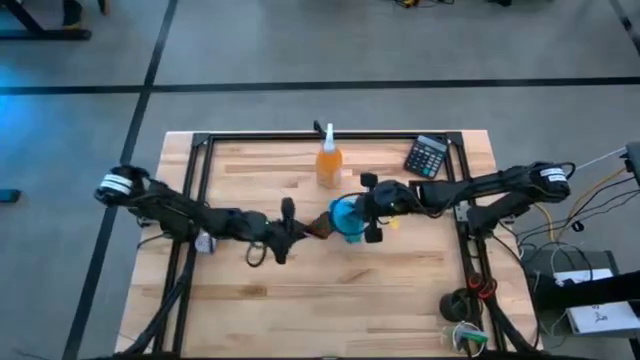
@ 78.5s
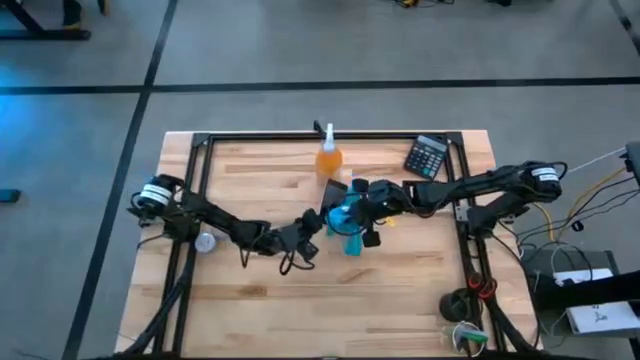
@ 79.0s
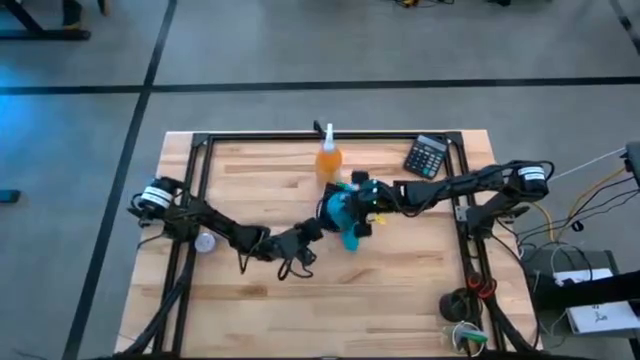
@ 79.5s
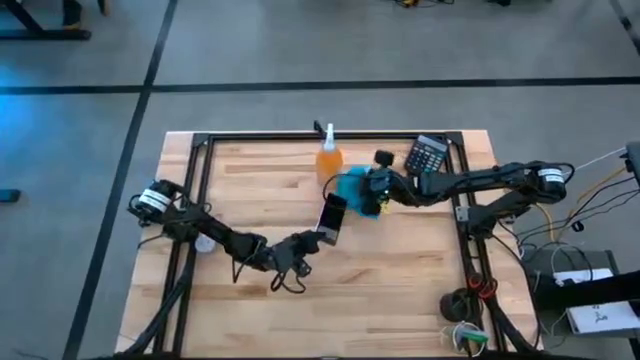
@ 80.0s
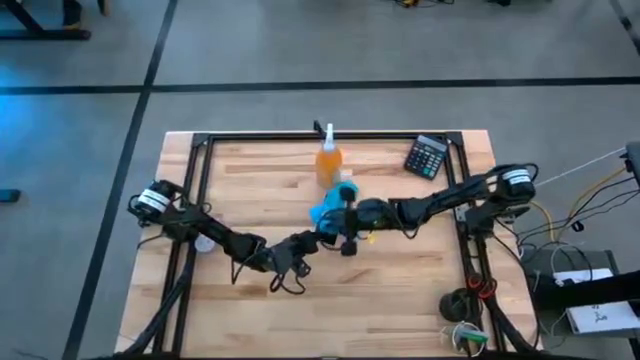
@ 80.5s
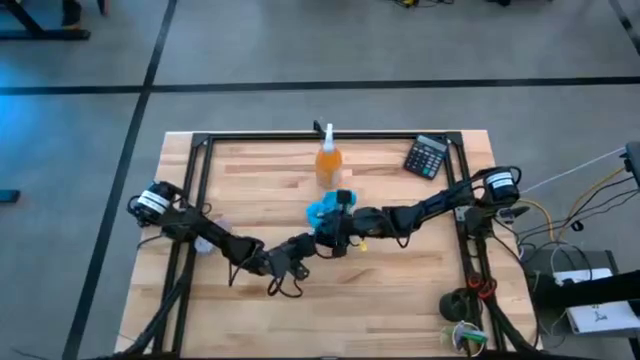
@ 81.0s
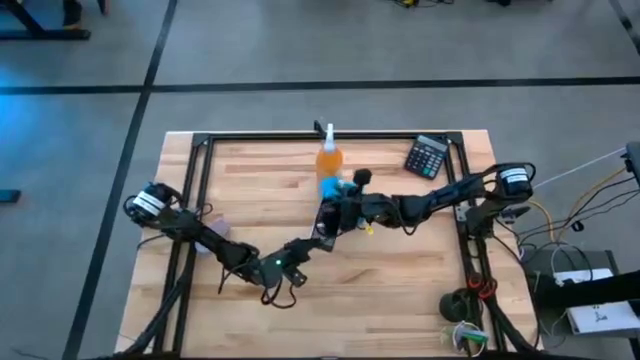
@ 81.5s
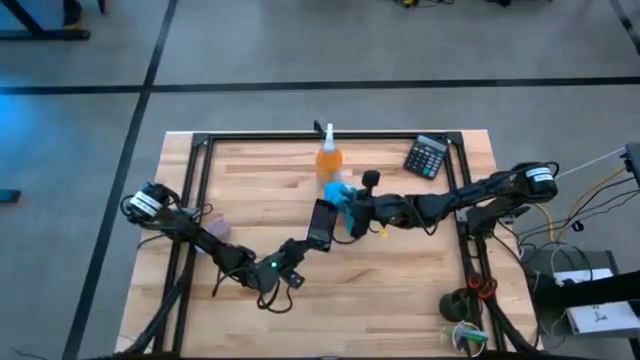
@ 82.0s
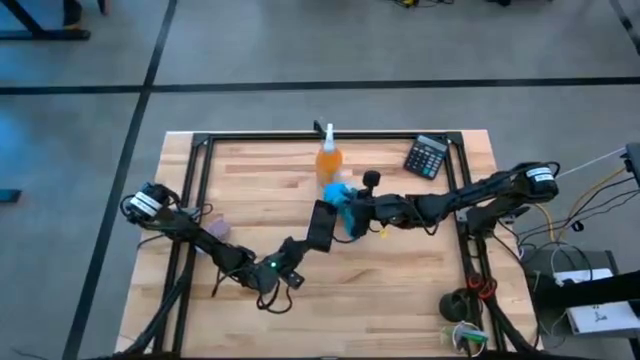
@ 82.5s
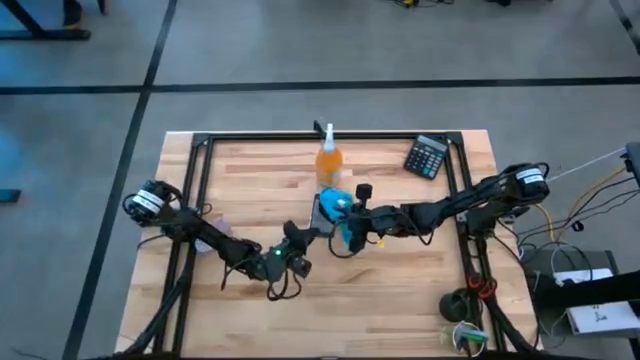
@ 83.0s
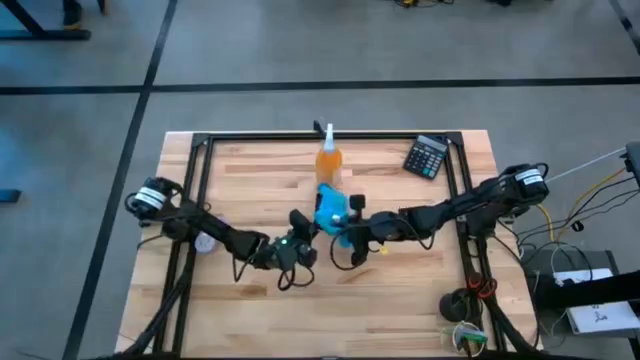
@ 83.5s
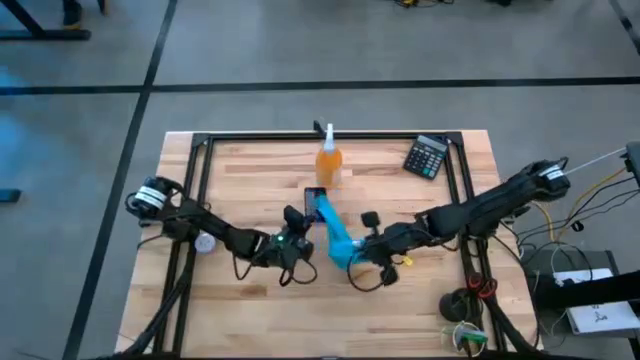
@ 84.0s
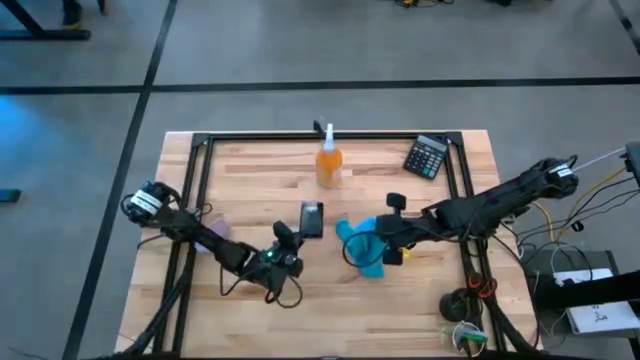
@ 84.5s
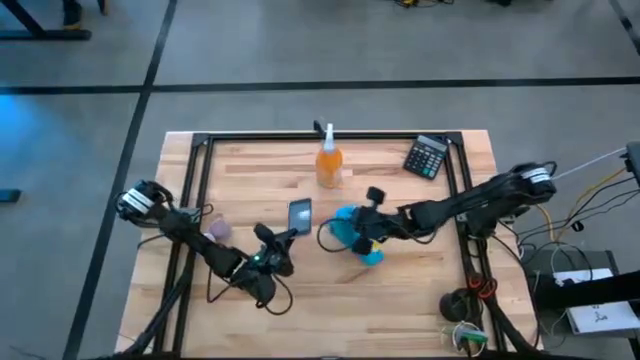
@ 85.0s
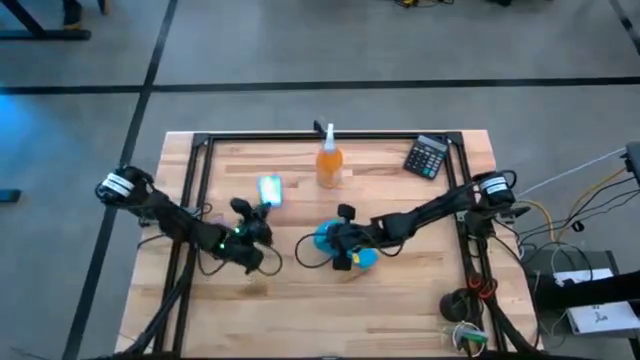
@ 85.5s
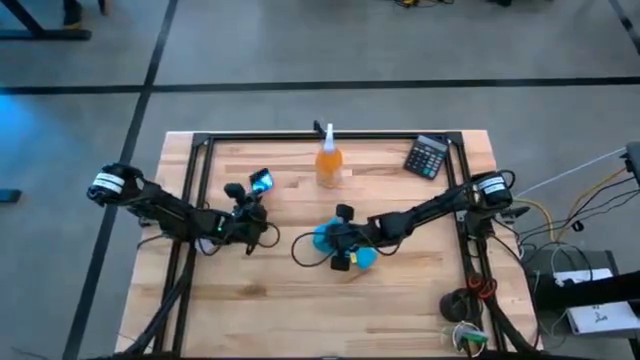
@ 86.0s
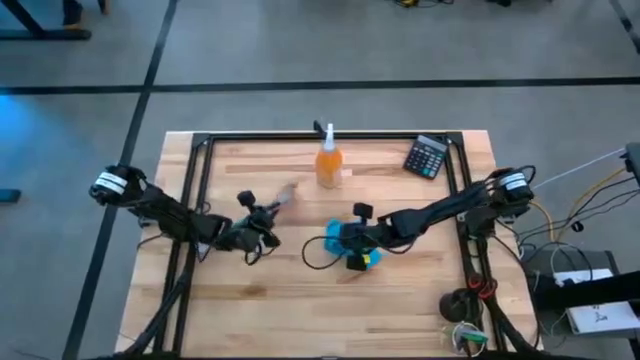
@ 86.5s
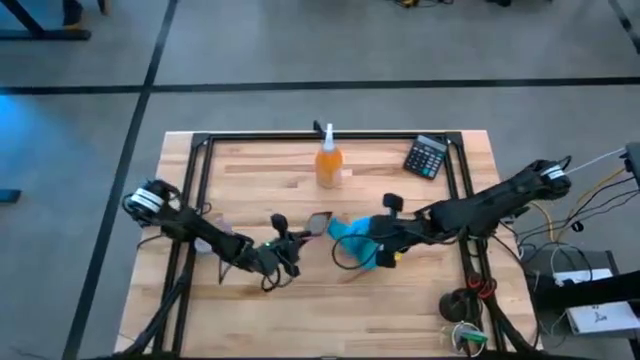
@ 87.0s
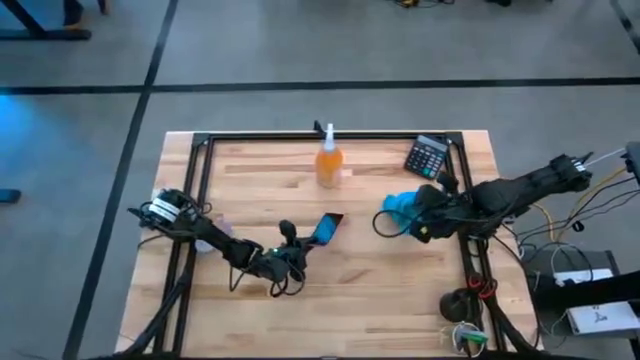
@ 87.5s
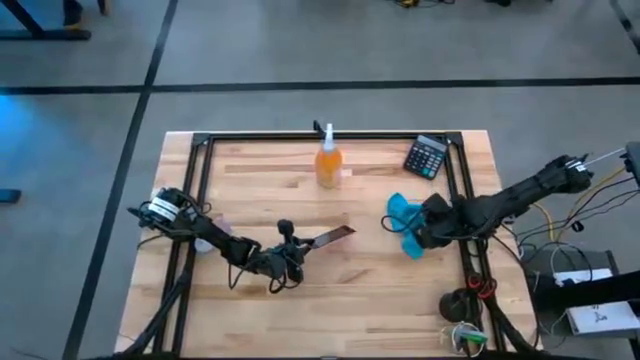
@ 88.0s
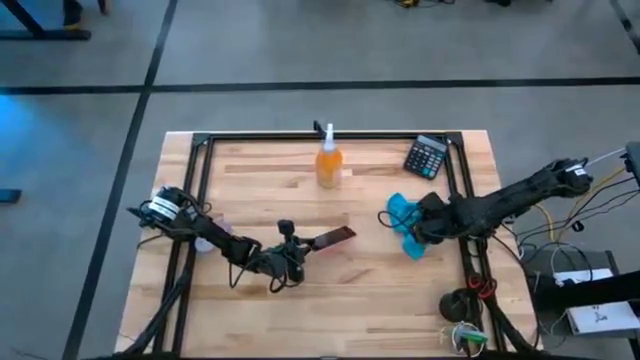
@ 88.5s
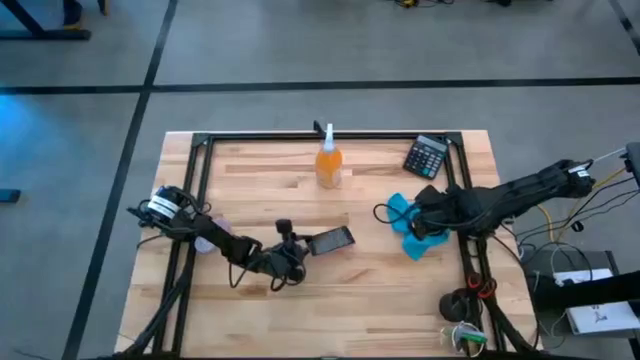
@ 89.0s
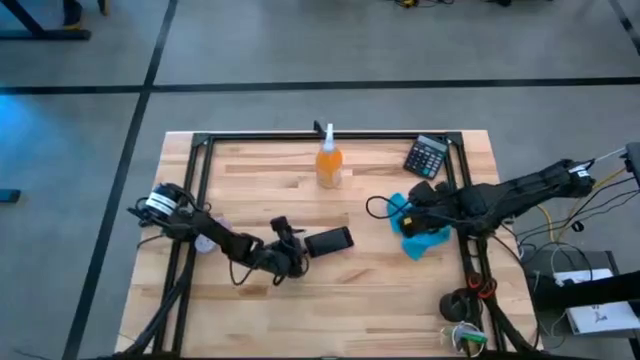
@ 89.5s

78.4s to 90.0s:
Task: Apply microfiber cloth
Wipe the front of the pink cellphone using microfiber cloth

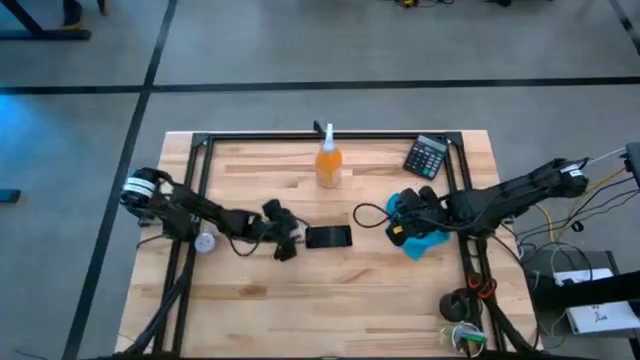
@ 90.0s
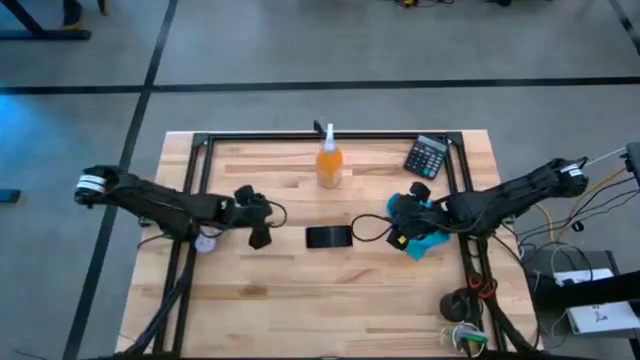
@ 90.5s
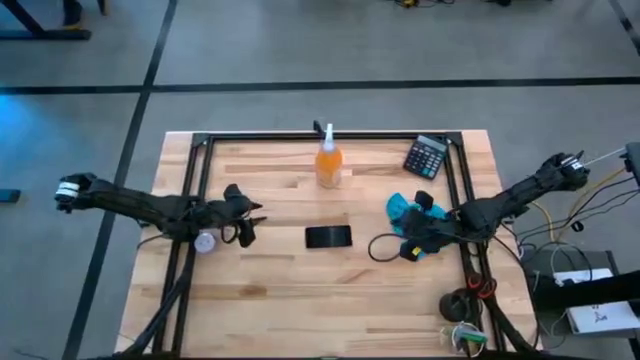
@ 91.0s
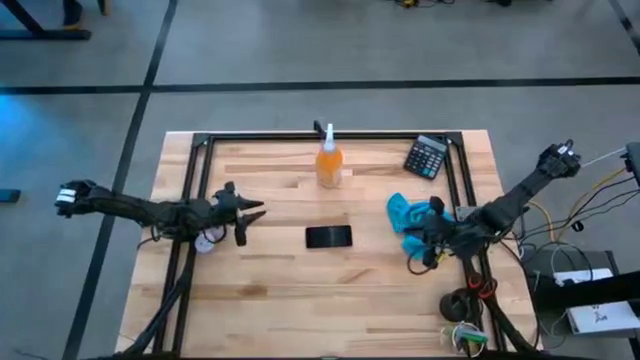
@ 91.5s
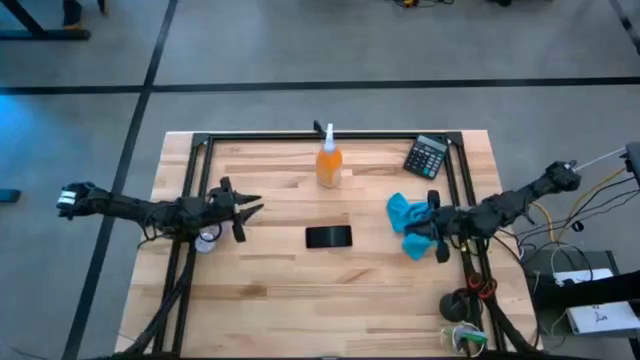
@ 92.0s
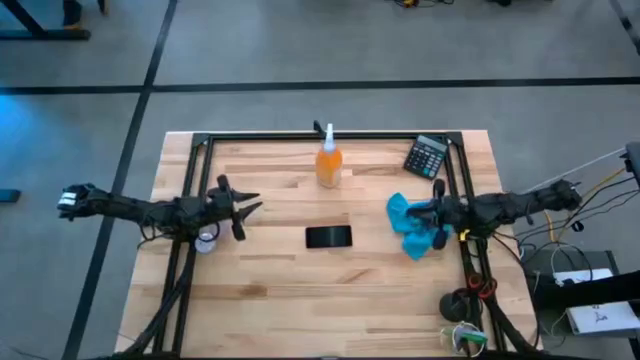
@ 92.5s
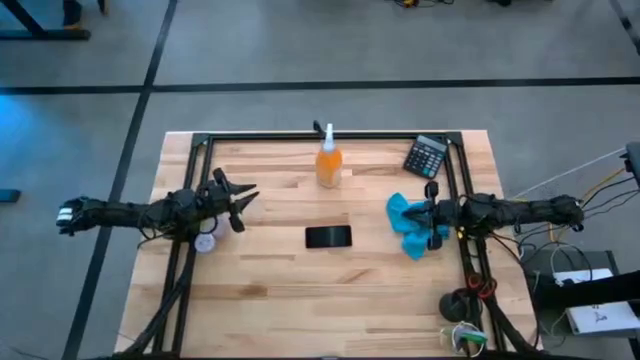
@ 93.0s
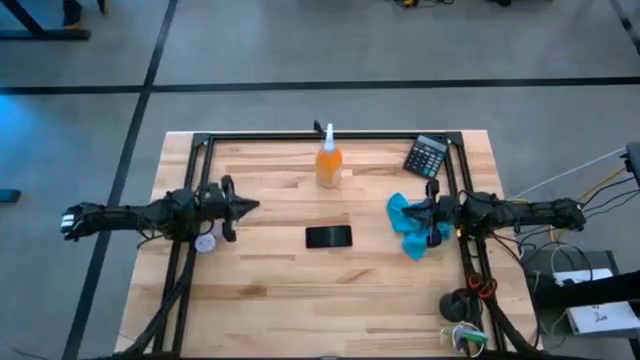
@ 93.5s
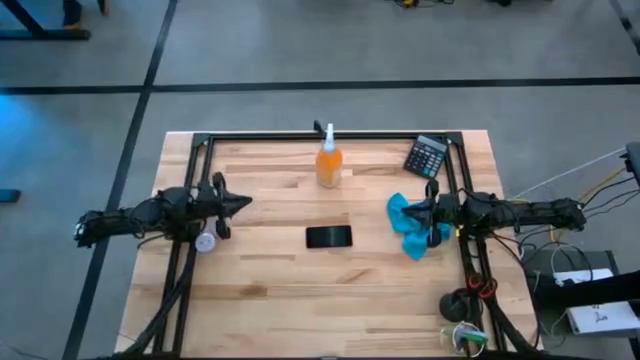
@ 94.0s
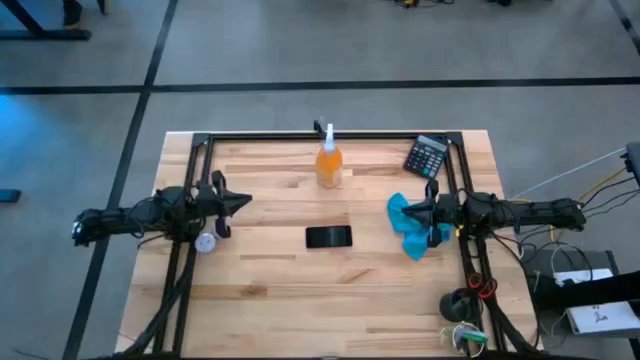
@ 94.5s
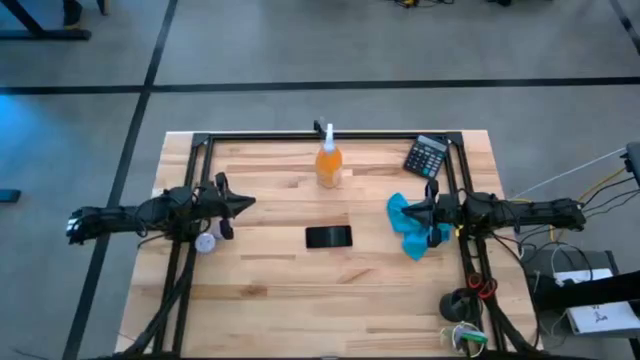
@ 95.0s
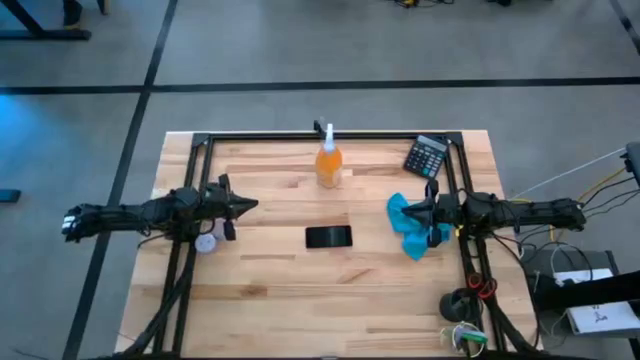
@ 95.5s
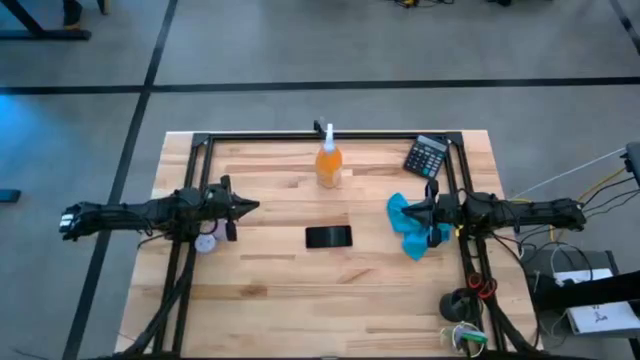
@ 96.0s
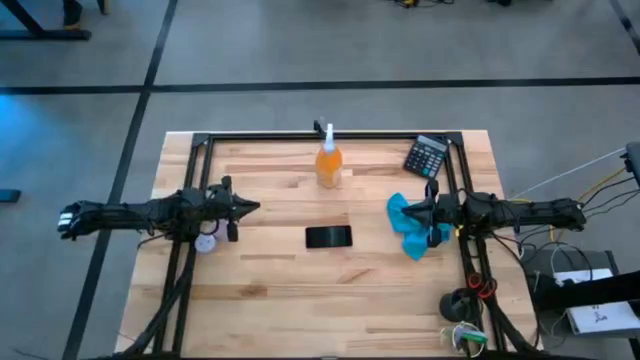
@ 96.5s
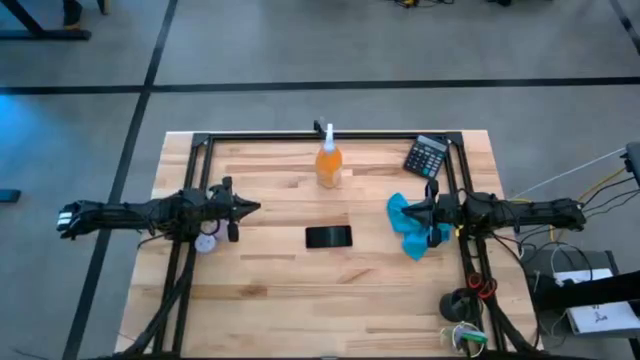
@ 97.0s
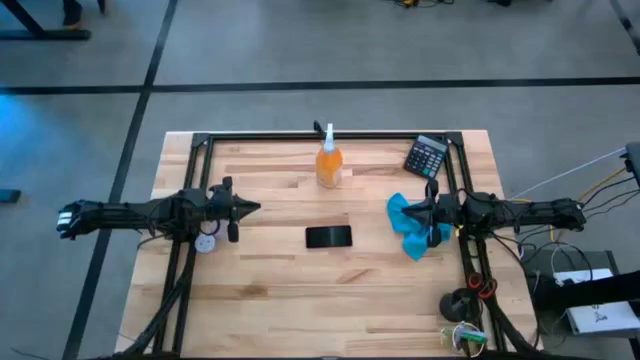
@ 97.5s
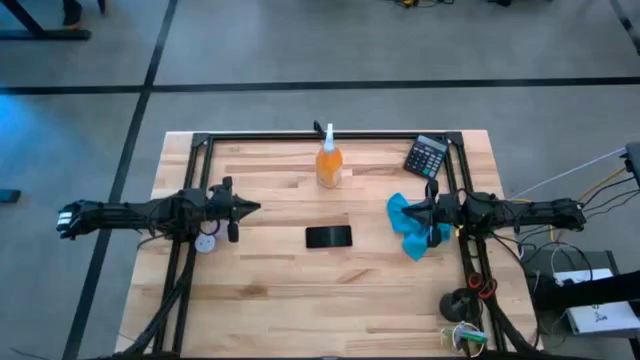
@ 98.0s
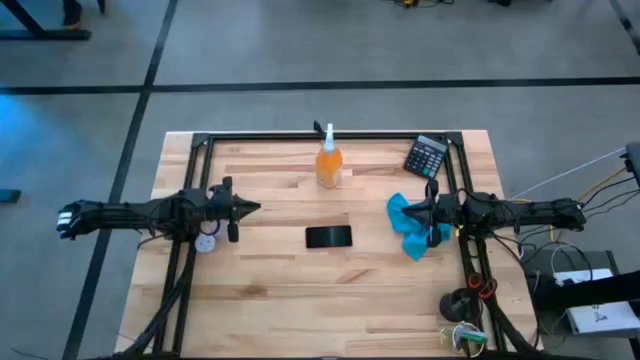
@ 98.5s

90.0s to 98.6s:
Return to Home Position
